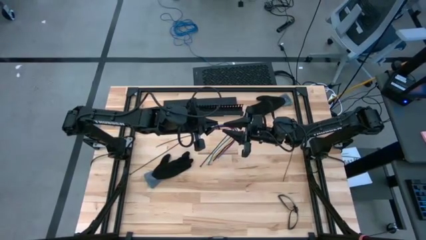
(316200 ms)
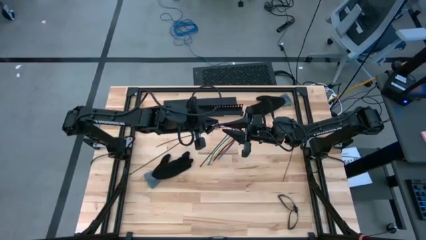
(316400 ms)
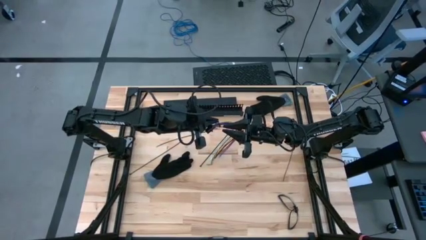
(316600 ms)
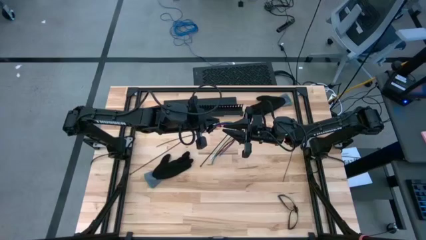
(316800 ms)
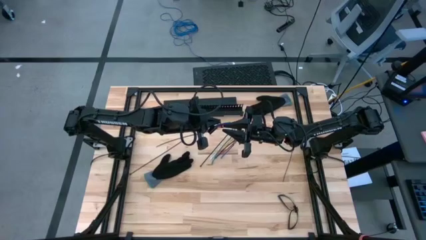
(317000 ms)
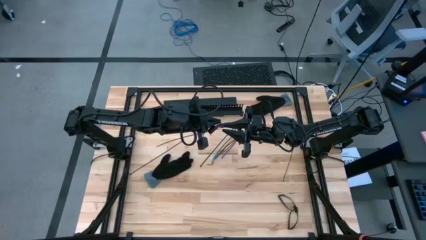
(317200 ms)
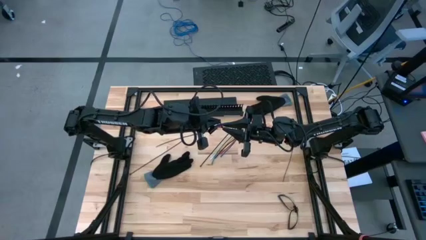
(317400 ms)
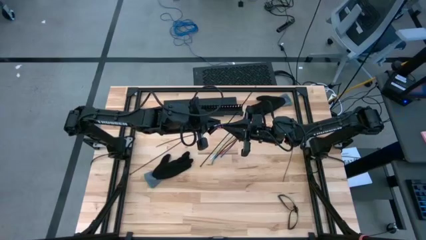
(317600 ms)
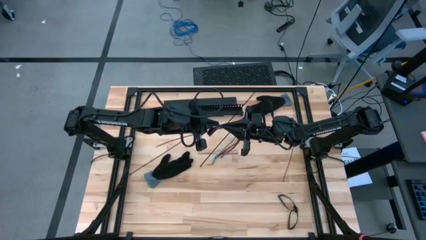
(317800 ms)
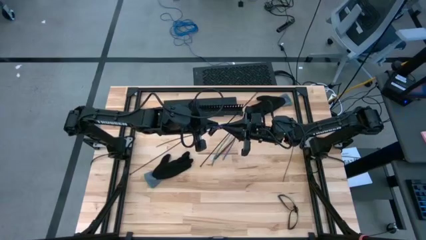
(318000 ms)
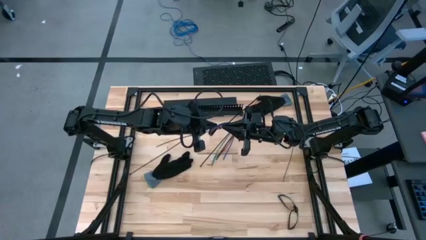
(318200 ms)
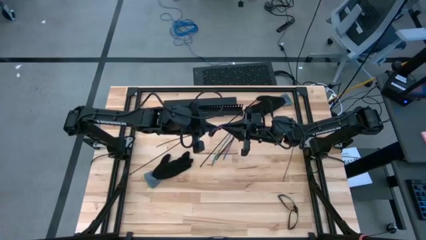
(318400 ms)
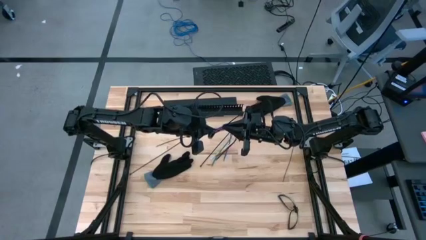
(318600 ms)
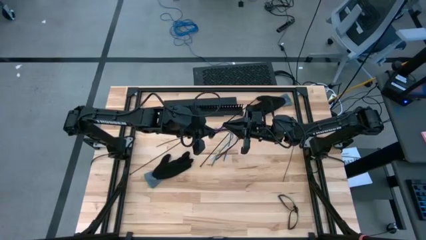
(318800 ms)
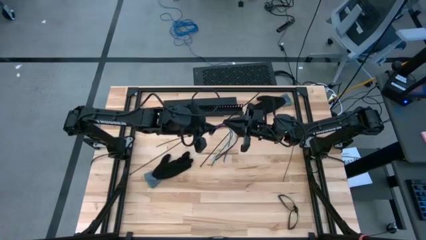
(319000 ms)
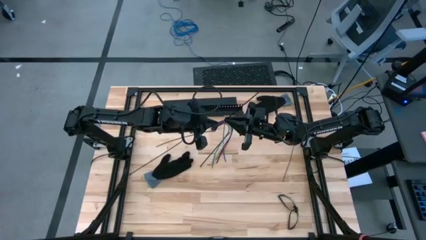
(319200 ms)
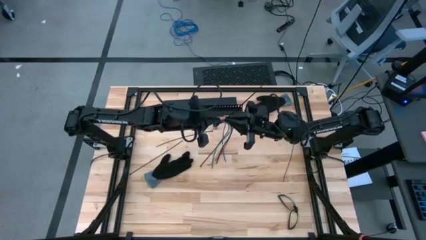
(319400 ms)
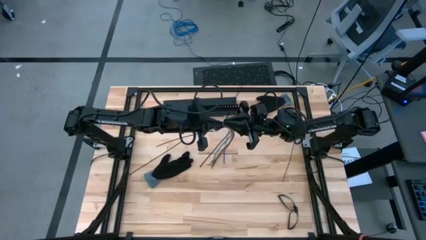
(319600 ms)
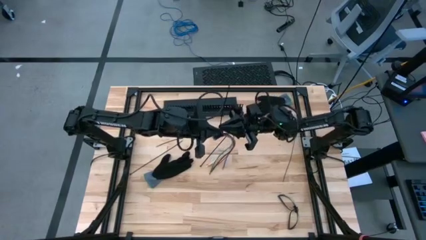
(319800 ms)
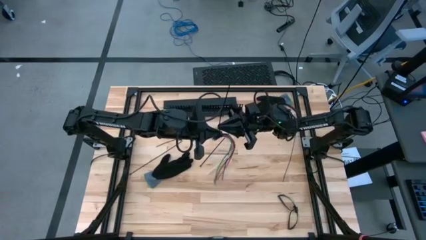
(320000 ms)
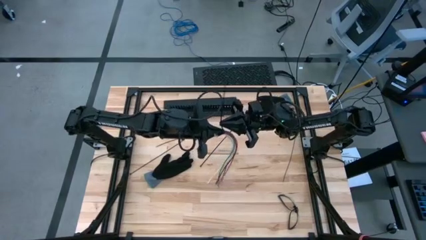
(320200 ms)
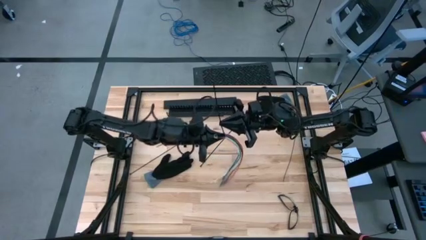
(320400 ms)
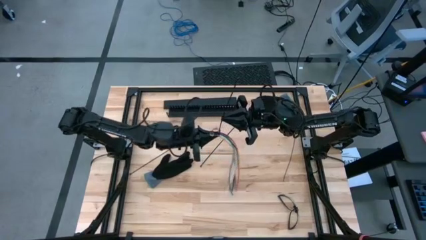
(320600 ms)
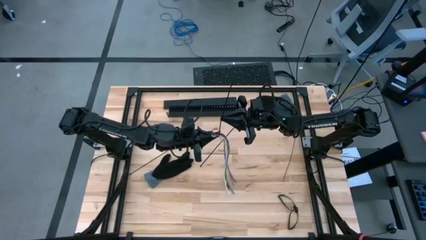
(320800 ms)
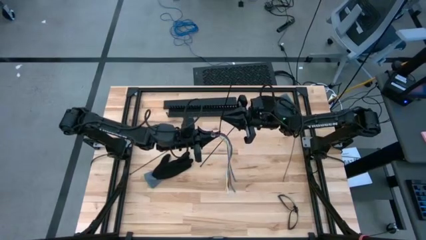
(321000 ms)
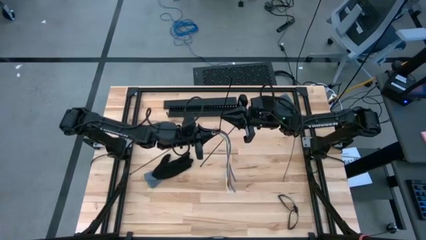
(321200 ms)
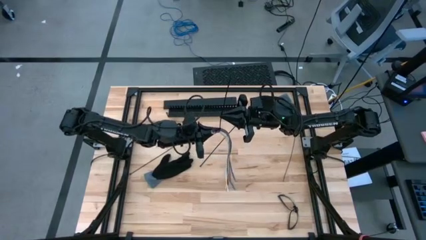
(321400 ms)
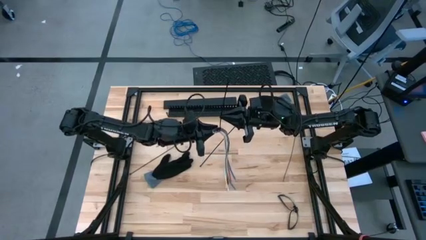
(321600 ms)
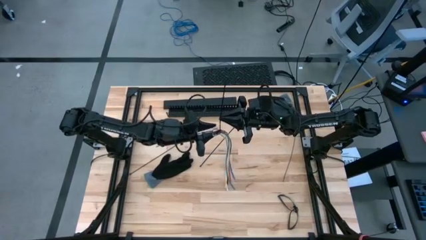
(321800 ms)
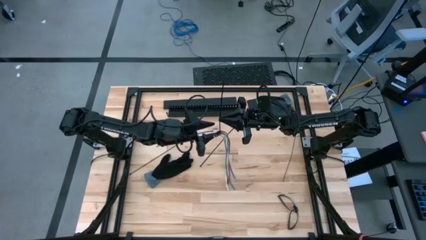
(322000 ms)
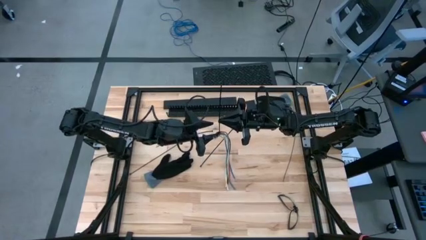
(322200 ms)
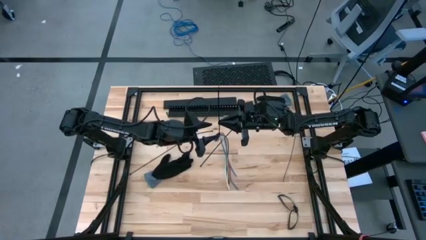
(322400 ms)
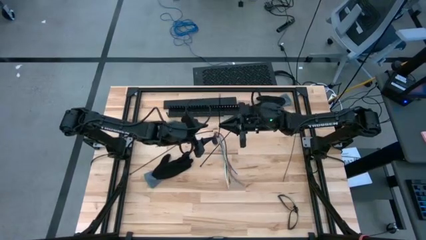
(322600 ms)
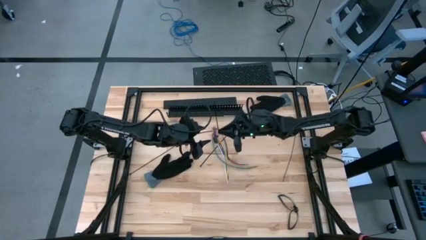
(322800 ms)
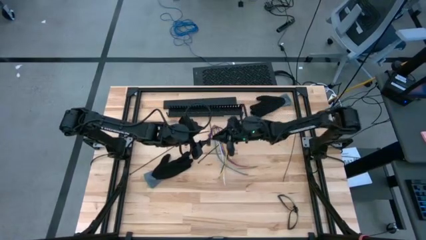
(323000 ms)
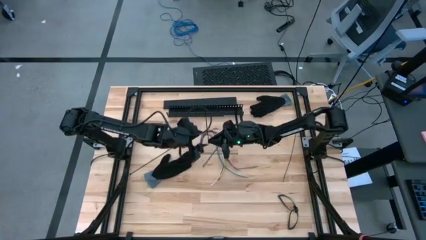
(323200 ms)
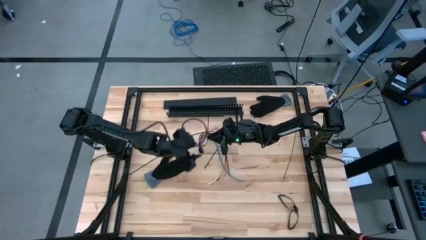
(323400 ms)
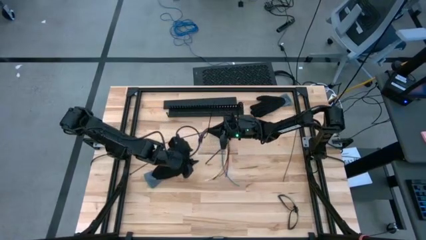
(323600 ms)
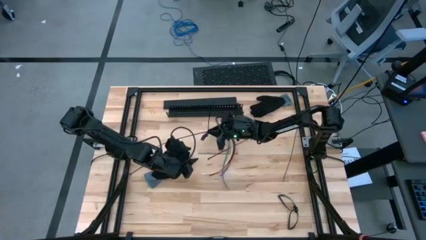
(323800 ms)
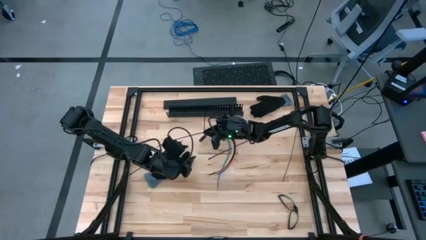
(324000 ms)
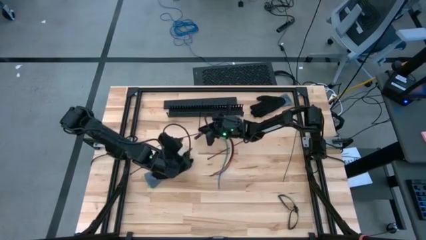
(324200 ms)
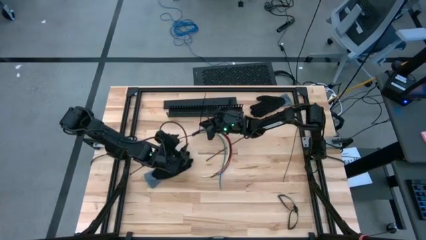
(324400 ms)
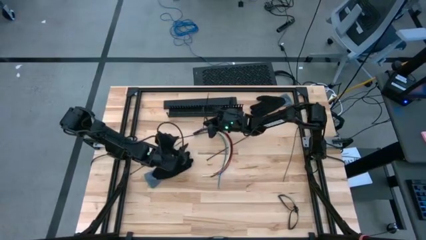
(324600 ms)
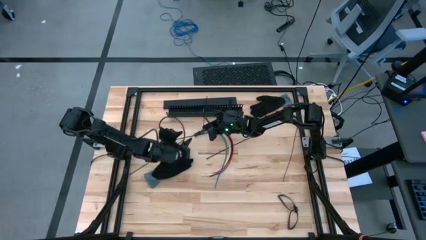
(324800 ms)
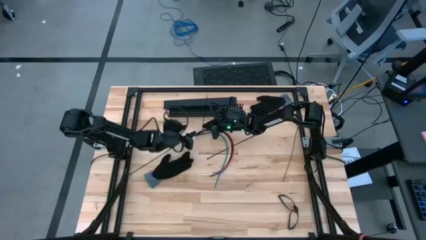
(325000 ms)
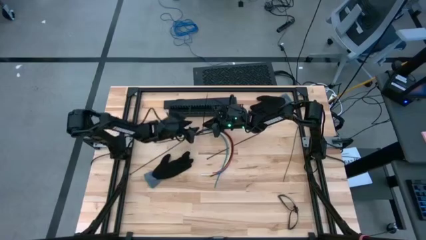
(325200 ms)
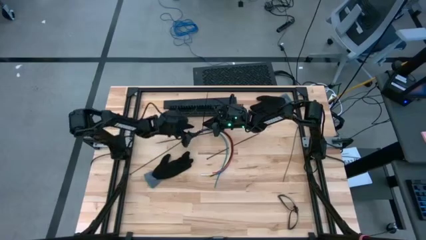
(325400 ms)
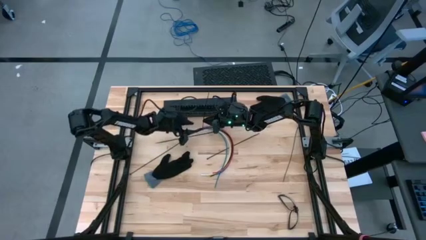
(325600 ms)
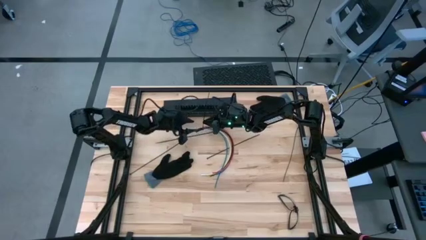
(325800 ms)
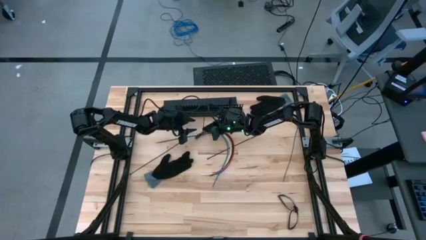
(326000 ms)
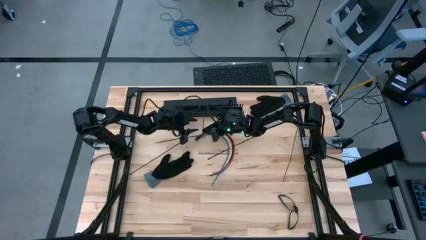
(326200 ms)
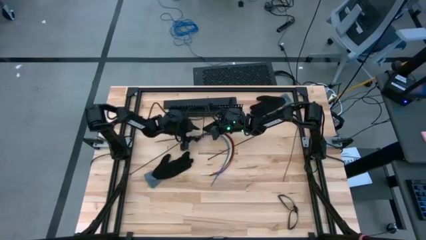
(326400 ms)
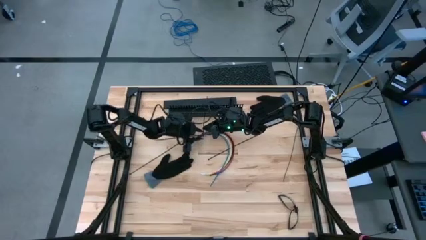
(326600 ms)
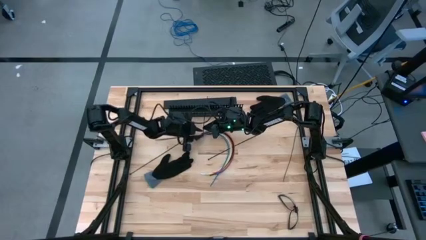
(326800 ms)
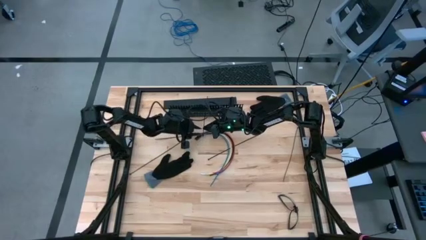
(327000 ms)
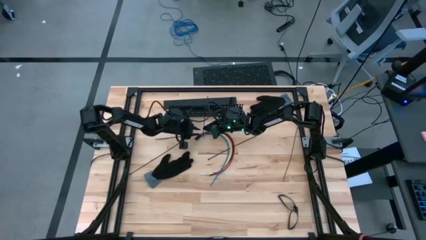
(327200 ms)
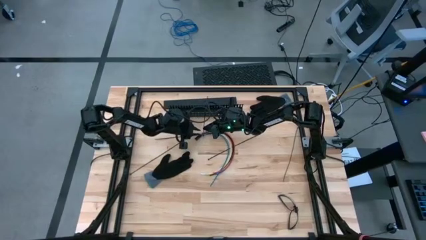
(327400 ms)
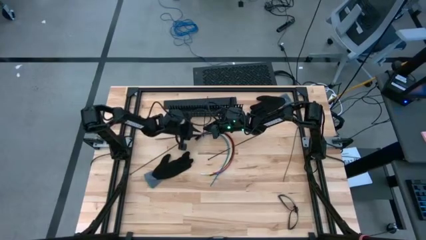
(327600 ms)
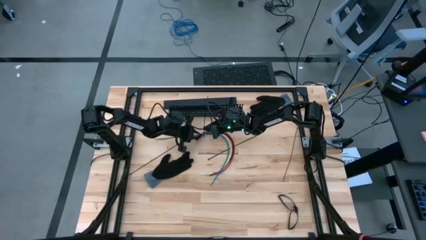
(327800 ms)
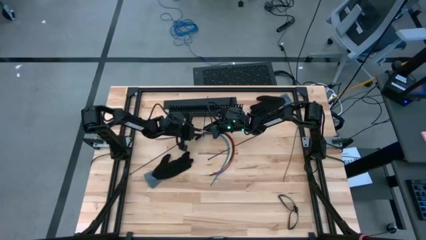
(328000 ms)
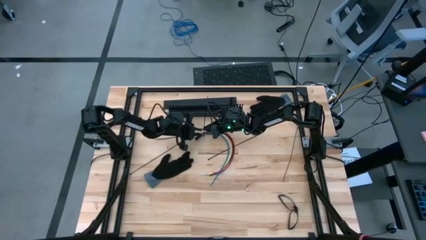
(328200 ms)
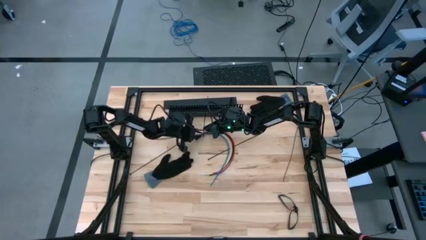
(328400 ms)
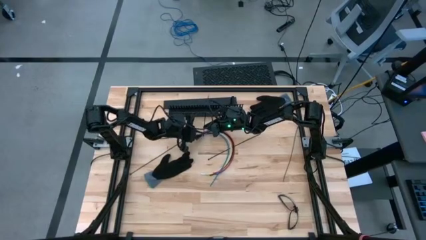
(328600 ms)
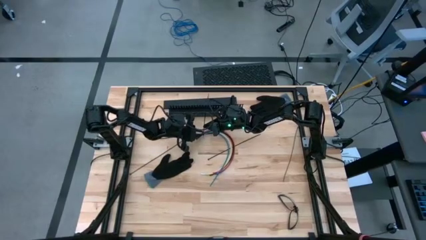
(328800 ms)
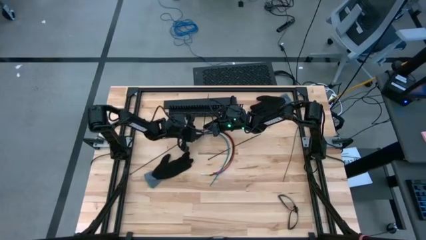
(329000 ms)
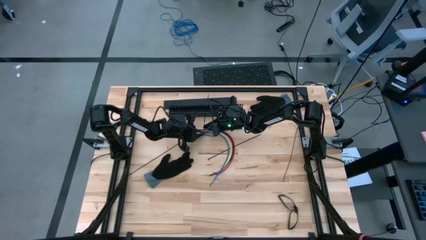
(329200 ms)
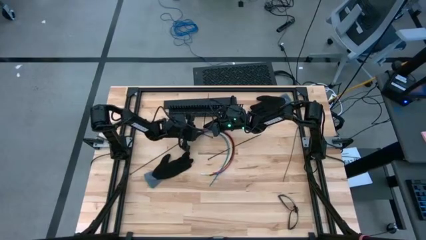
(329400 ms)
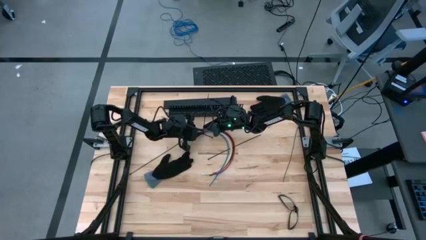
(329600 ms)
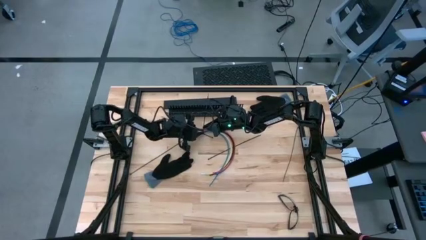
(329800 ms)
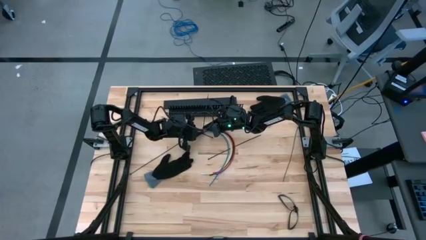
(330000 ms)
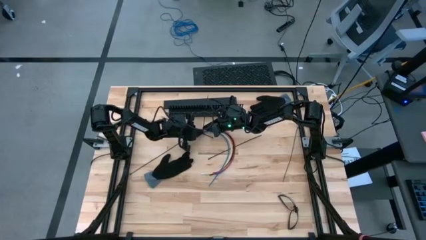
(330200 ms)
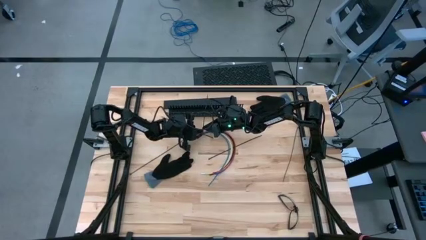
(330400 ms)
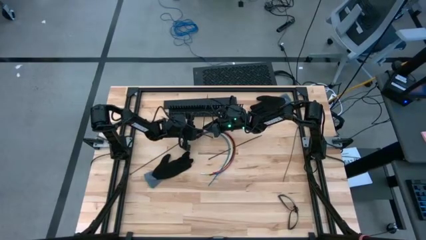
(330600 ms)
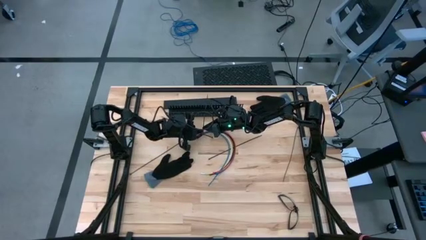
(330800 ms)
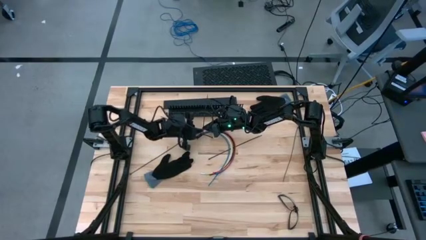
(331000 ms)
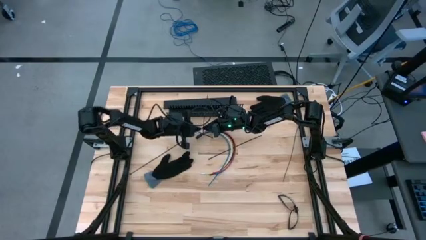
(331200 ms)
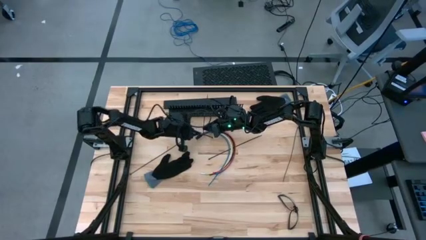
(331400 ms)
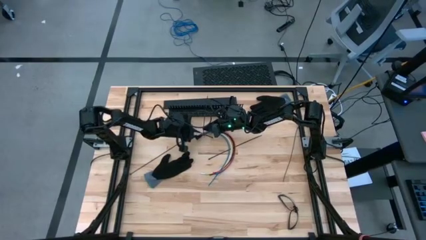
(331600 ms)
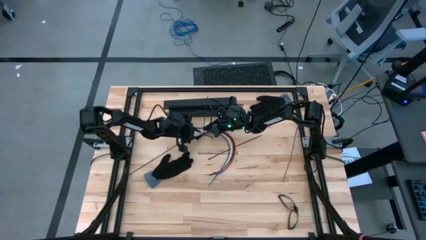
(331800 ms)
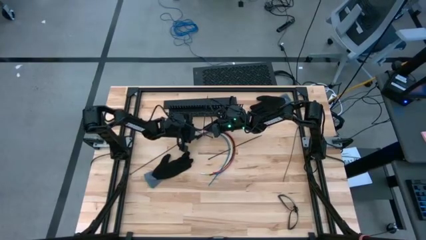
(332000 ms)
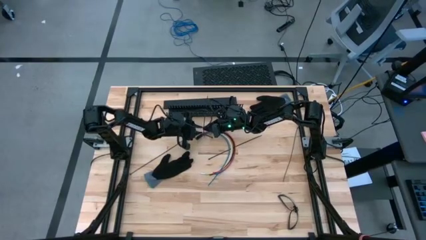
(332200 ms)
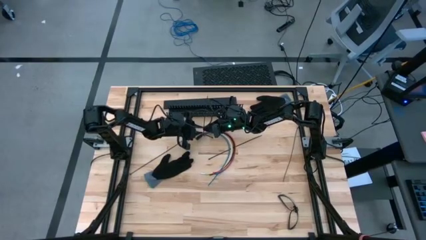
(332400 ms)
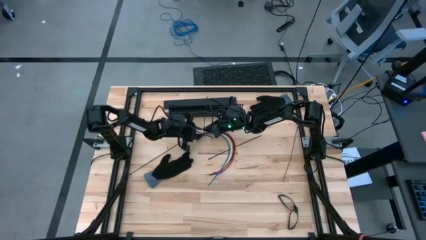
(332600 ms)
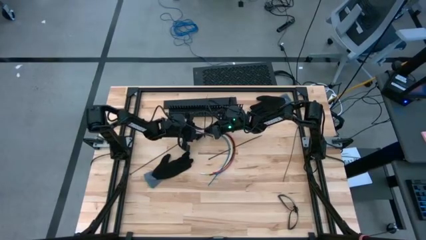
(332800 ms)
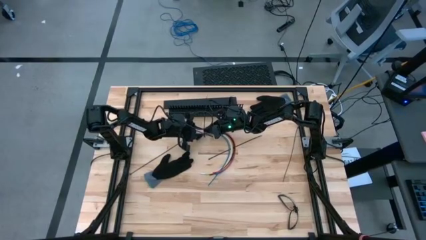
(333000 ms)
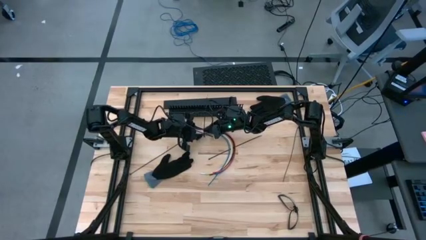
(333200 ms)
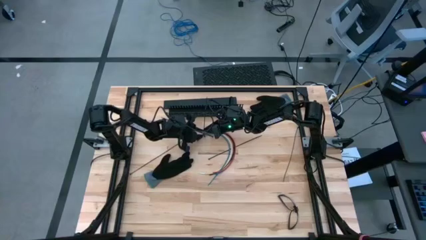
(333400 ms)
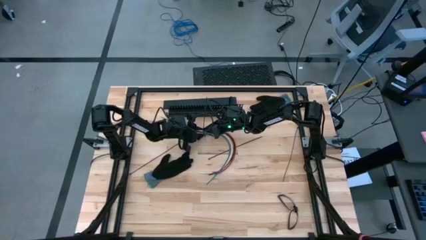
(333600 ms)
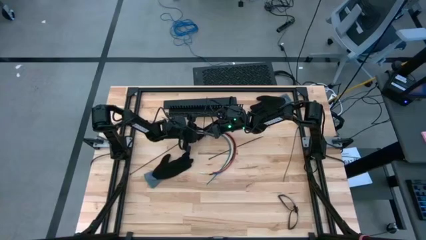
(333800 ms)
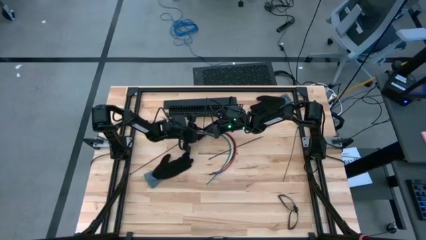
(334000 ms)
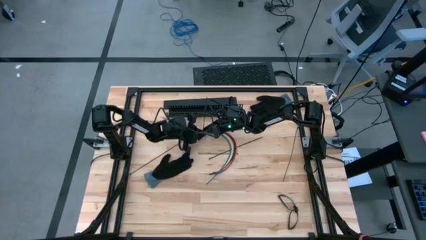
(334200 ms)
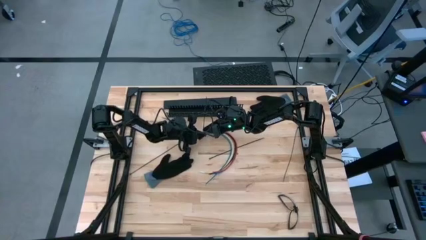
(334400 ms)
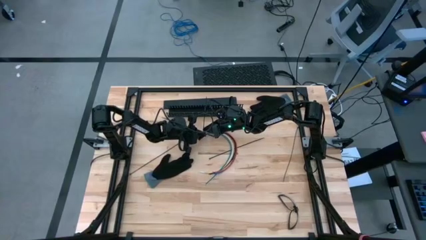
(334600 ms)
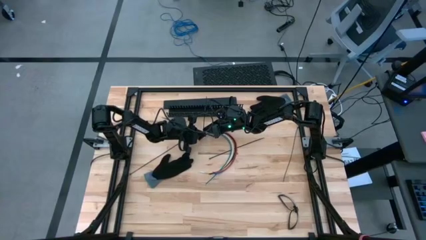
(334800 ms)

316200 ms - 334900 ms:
Task: Ziptie cables
Wrap the cable wires using a zip tie
